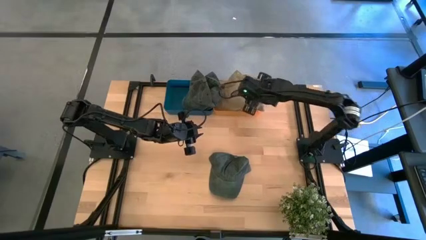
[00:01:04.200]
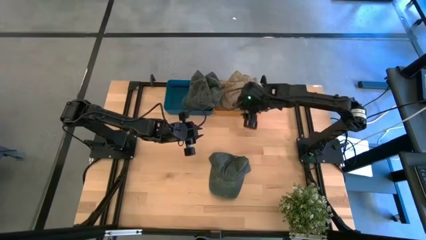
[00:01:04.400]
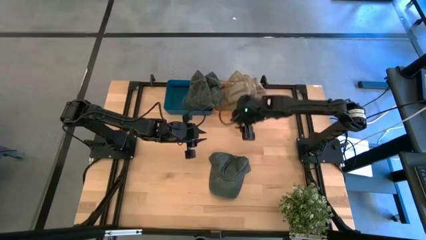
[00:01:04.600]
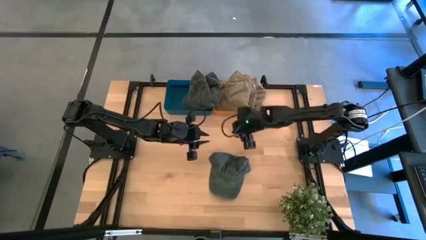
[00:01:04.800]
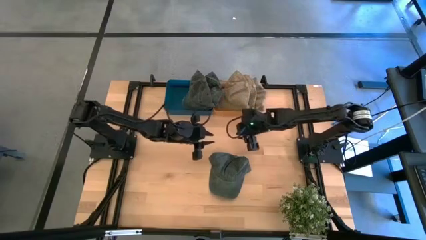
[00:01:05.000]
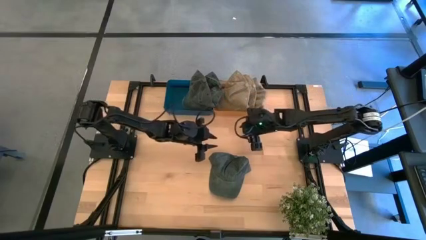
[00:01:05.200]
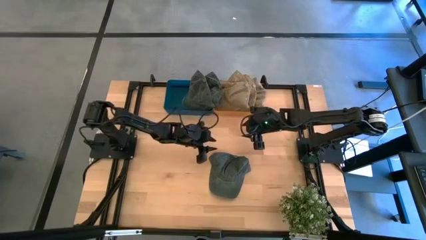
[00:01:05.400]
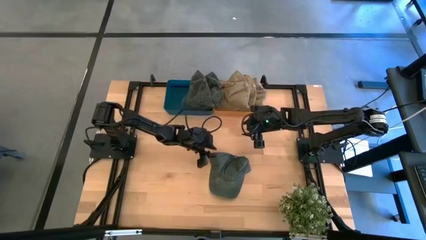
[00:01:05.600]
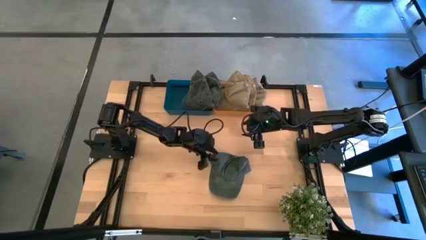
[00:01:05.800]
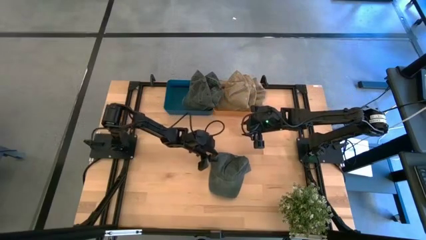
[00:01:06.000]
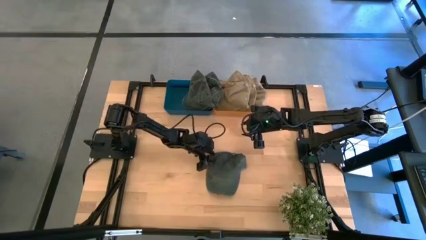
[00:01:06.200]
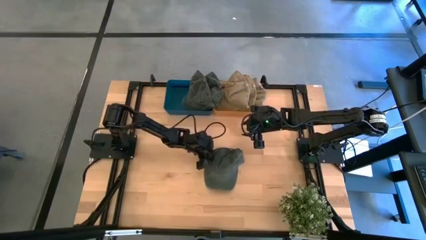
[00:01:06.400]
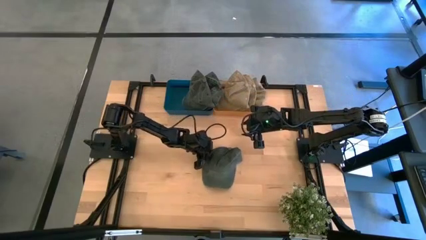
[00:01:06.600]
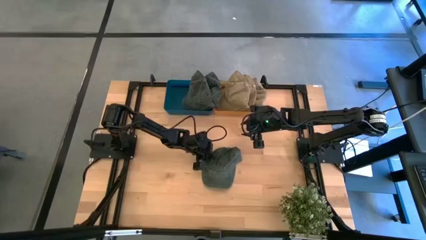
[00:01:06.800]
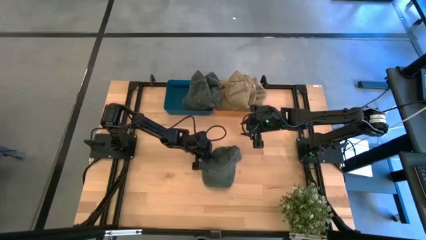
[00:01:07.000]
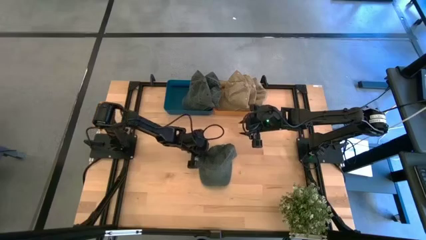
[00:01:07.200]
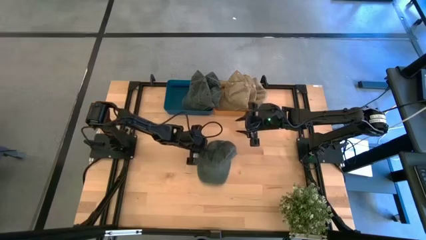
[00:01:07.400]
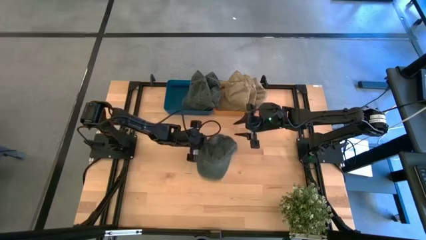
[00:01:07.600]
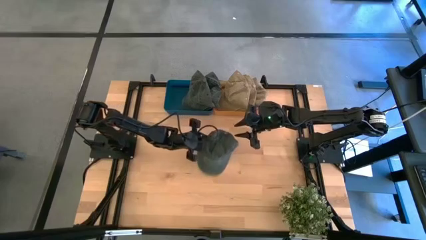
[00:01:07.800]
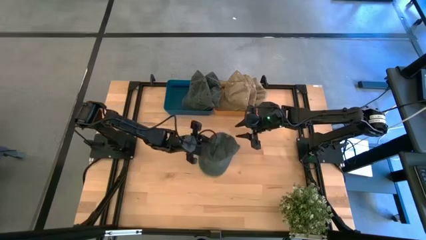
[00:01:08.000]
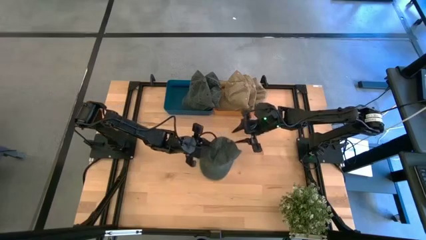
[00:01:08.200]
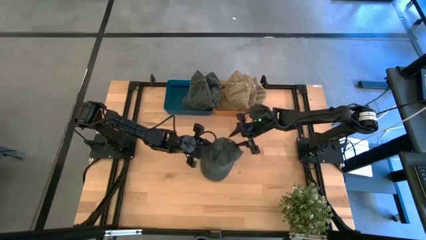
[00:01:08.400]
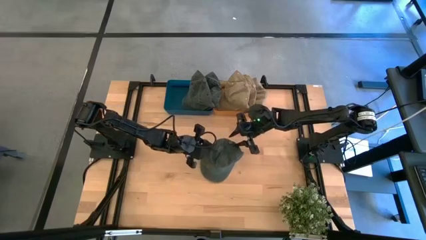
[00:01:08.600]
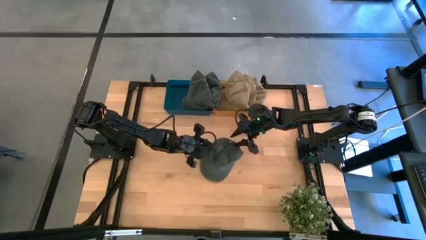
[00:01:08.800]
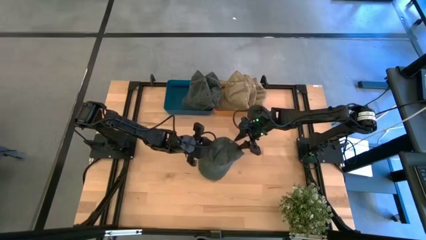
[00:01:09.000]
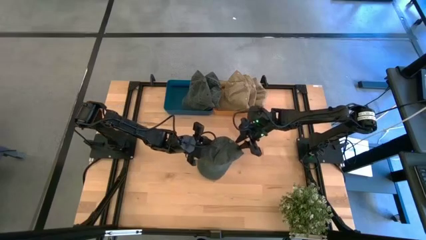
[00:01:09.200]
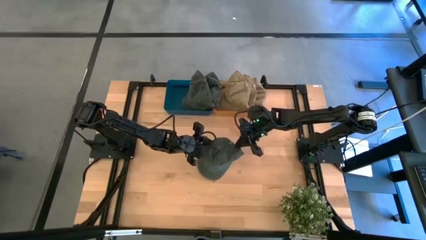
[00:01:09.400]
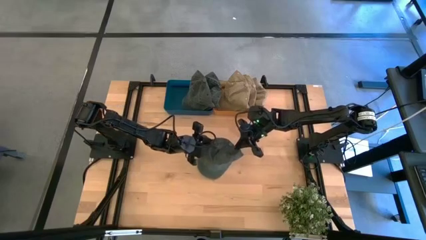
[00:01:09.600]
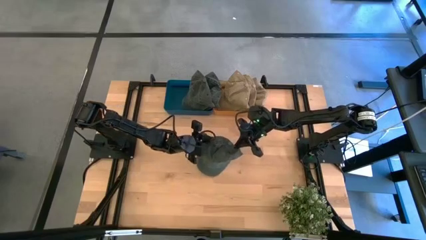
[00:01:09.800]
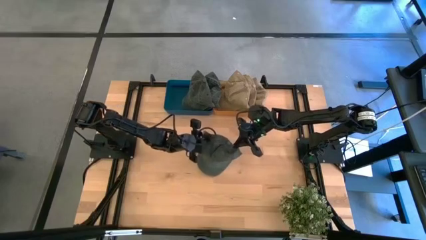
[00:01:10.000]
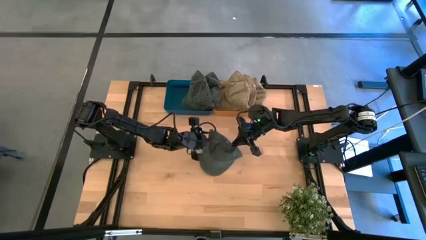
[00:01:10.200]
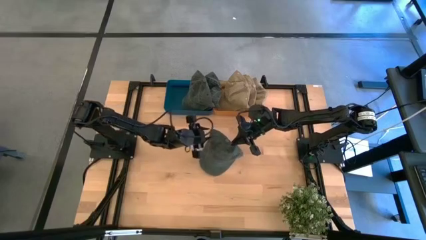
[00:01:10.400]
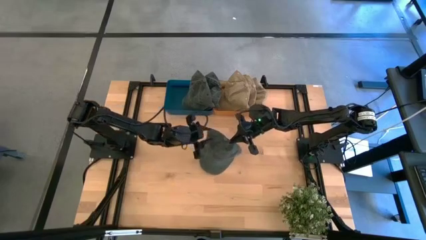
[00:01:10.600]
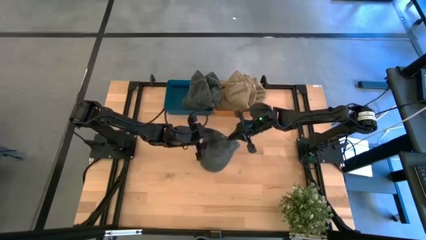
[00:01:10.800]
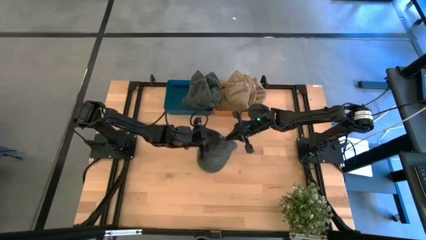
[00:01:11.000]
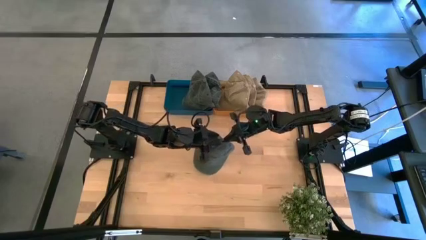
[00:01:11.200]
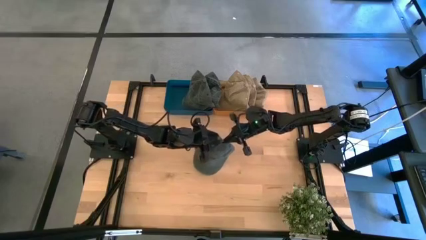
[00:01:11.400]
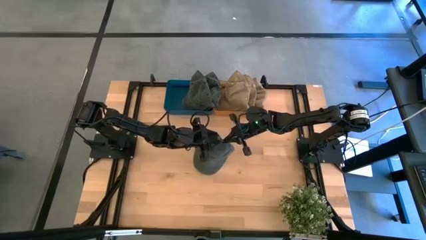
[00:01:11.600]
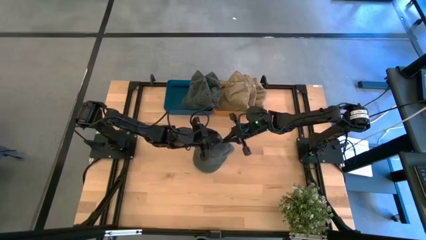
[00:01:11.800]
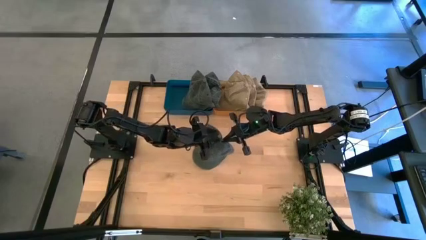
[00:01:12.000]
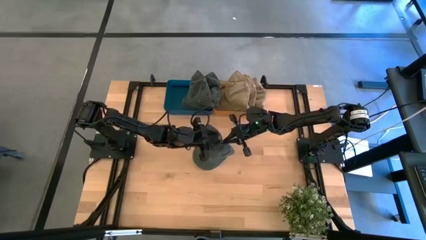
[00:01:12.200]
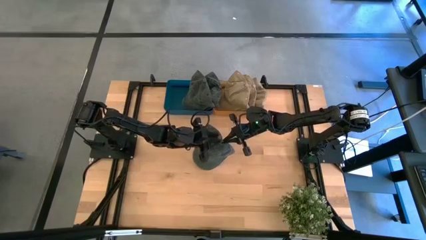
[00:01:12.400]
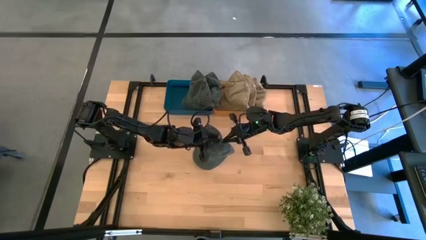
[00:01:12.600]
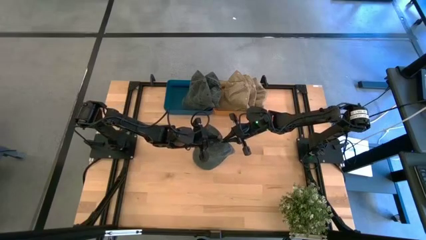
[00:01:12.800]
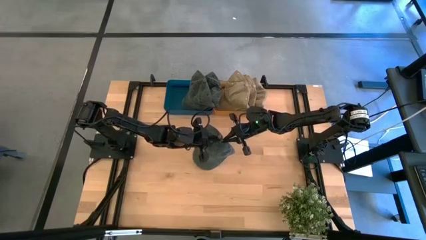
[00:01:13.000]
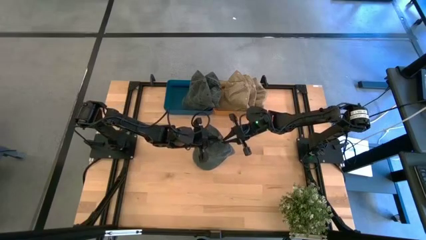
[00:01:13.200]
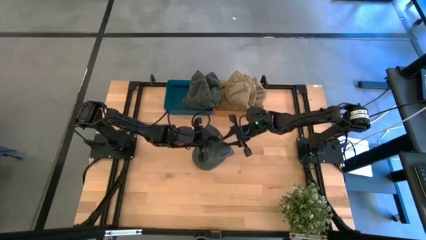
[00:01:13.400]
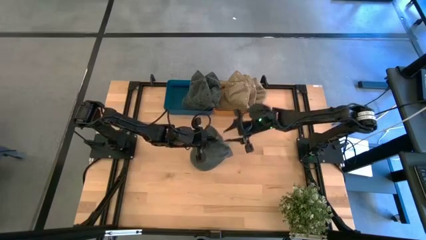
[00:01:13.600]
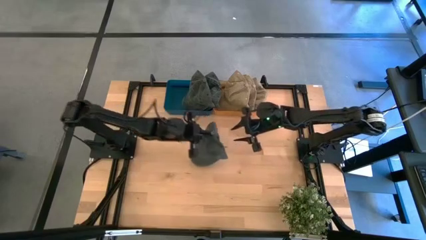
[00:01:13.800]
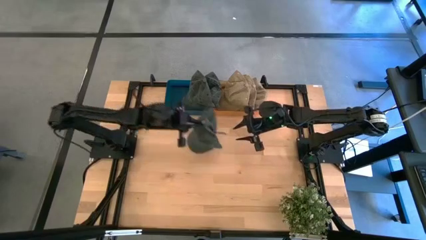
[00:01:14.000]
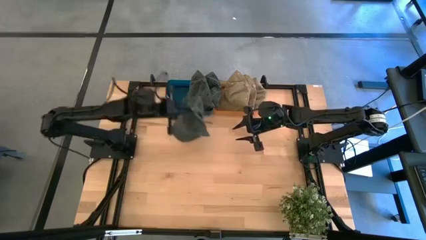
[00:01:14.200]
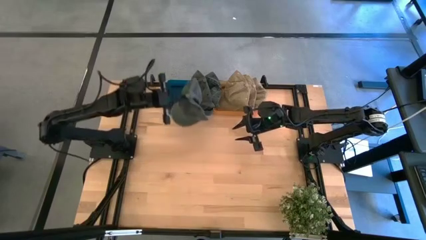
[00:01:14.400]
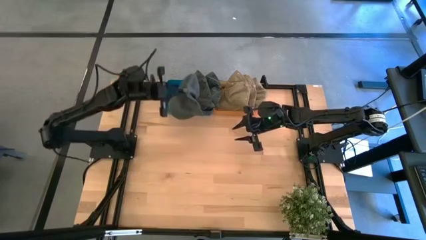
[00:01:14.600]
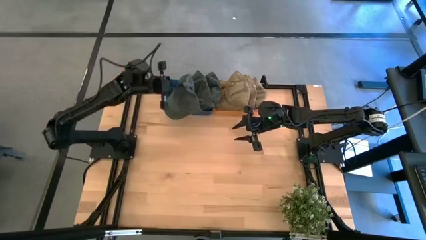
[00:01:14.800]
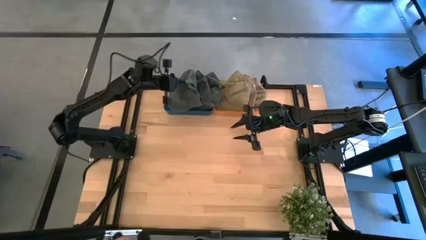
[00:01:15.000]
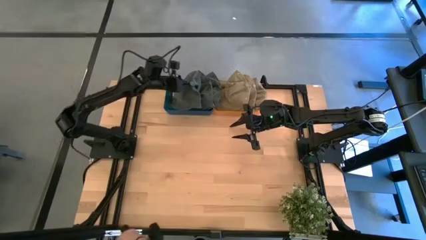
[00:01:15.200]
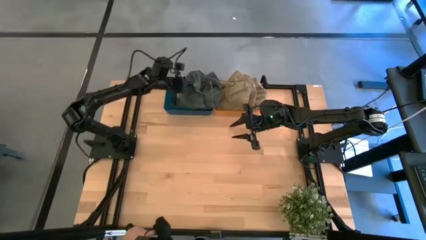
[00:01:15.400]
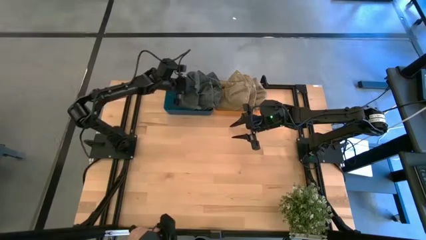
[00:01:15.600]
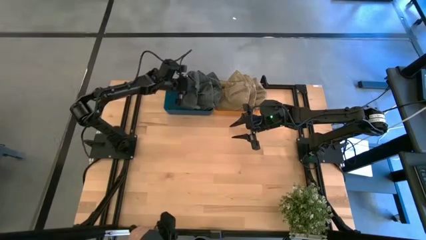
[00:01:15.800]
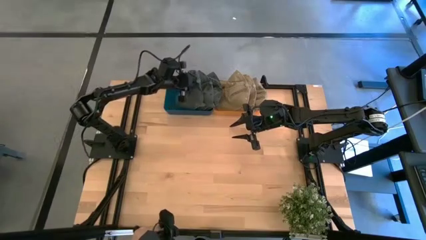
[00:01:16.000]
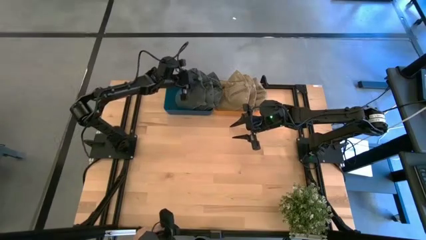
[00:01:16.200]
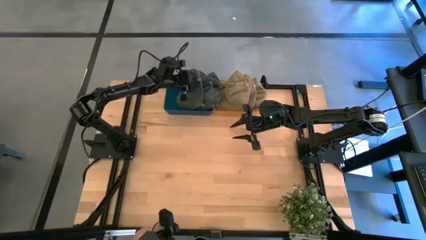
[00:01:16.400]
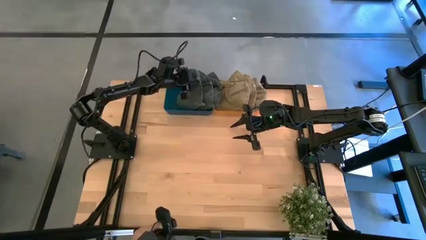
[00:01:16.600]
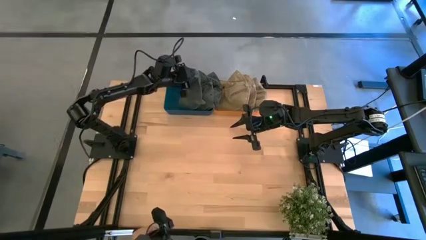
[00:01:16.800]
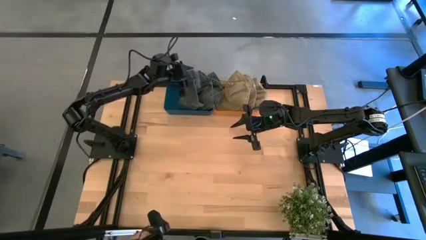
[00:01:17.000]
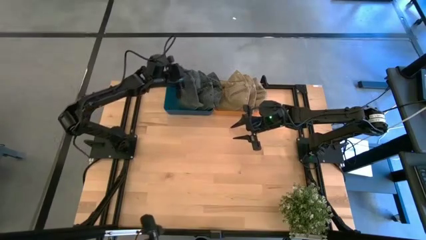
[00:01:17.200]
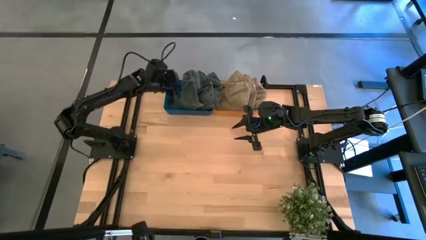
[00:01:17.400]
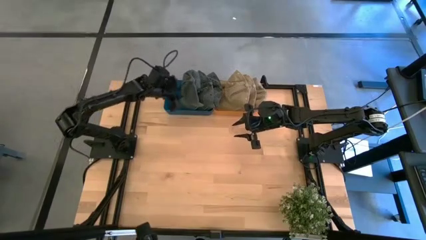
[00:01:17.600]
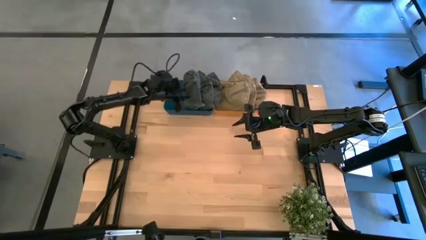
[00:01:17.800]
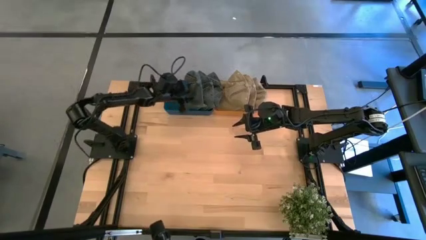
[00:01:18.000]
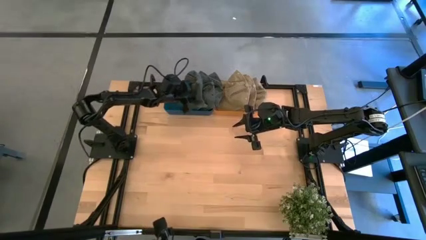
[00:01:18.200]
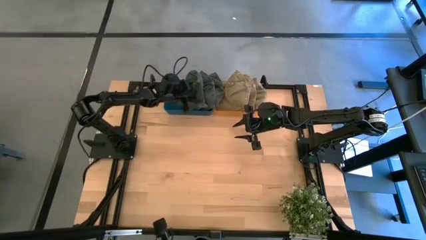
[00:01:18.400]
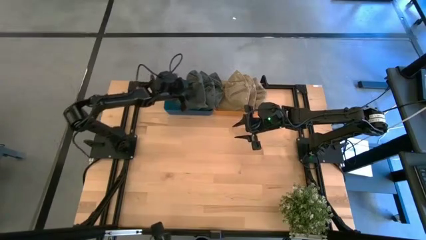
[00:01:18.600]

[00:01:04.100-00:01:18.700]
Task: Pick & Place hat
Put the black cap into the blue bin
